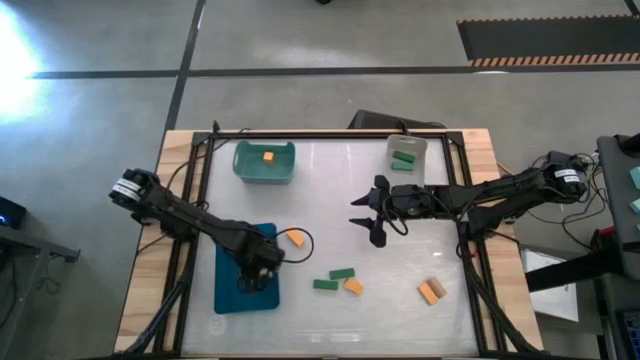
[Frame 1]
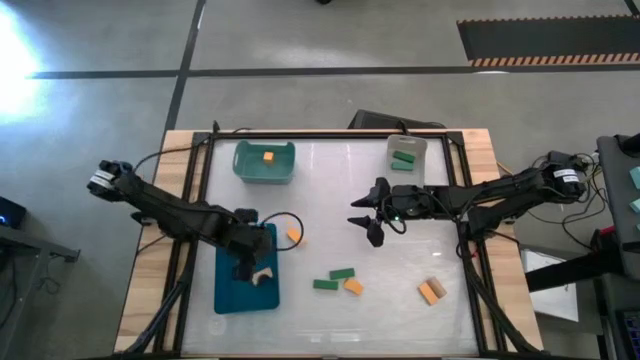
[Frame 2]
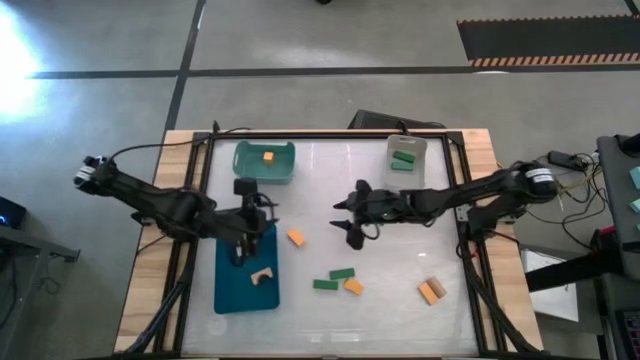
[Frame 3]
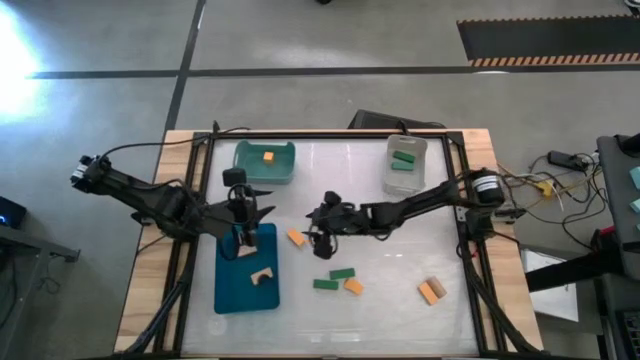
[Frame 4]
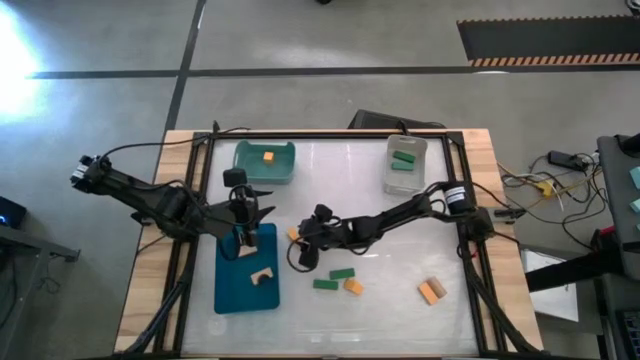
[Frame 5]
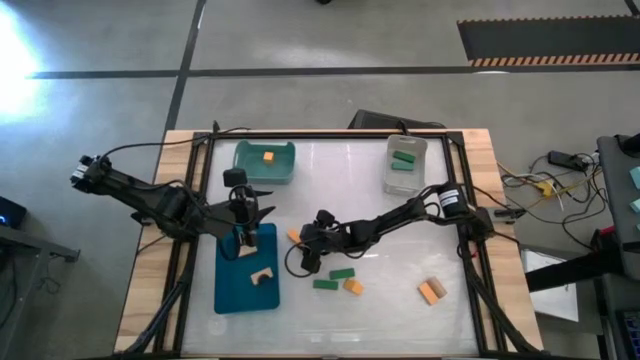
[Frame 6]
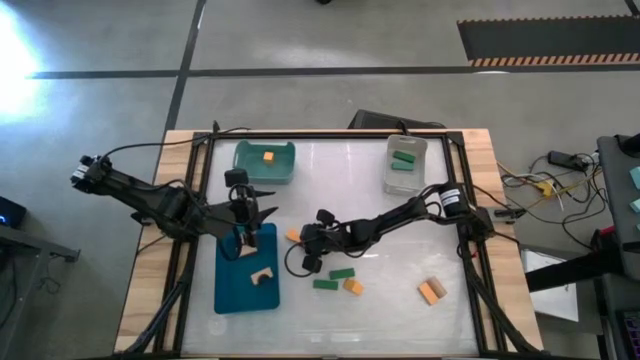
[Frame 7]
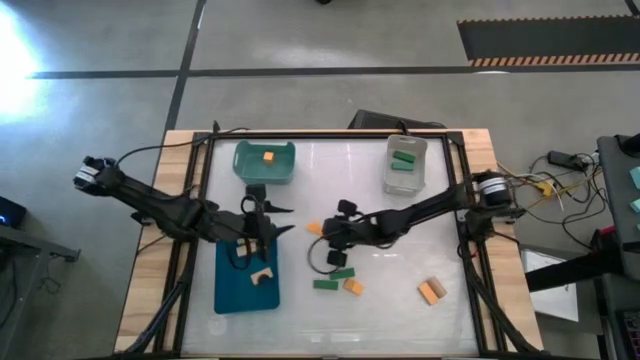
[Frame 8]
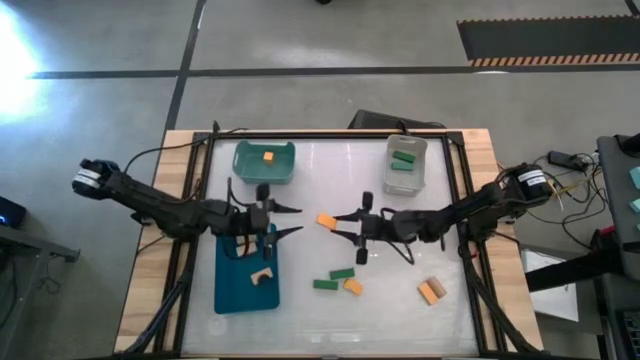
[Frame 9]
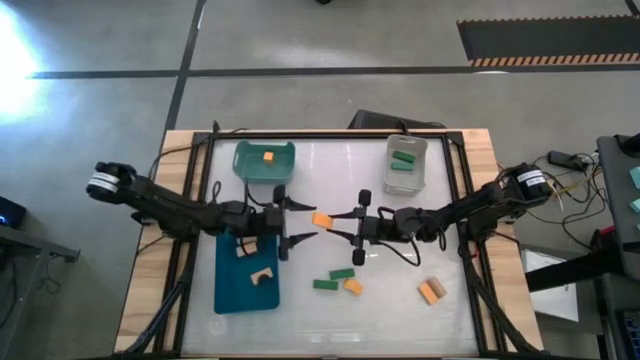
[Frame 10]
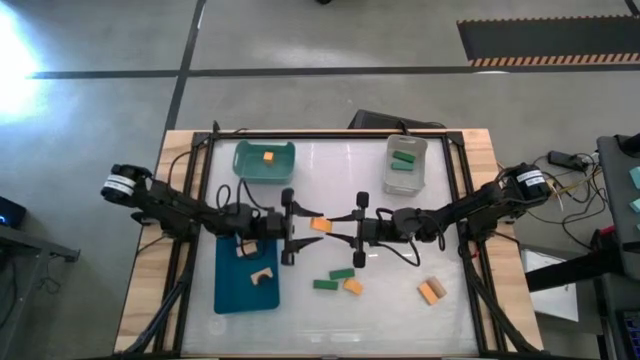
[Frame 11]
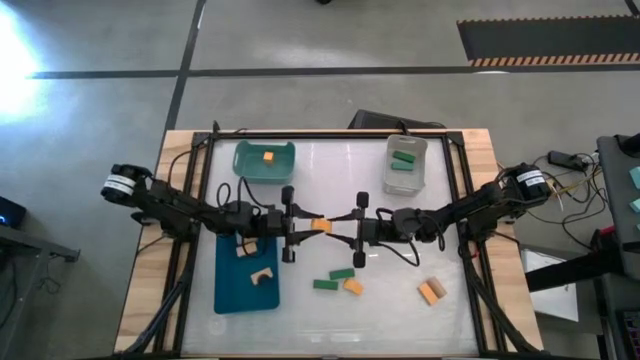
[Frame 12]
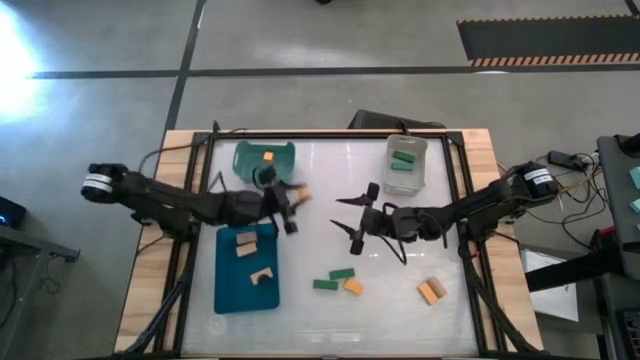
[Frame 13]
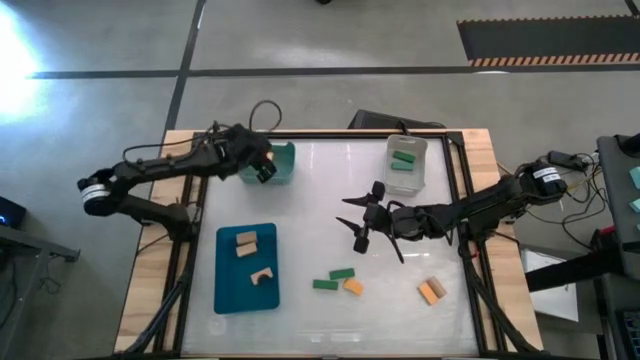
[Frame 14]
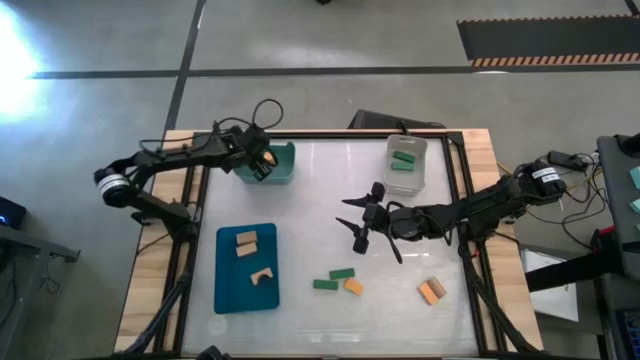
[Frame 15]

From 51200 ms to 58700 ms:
Task: Sort & place blocks by color
Put the yellow block into the green bin

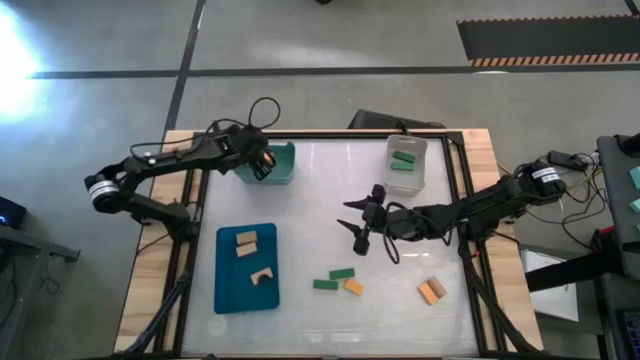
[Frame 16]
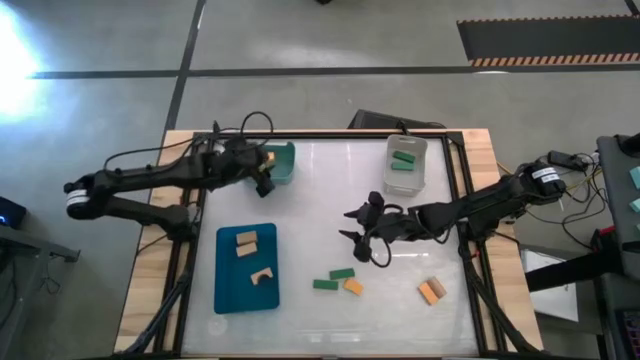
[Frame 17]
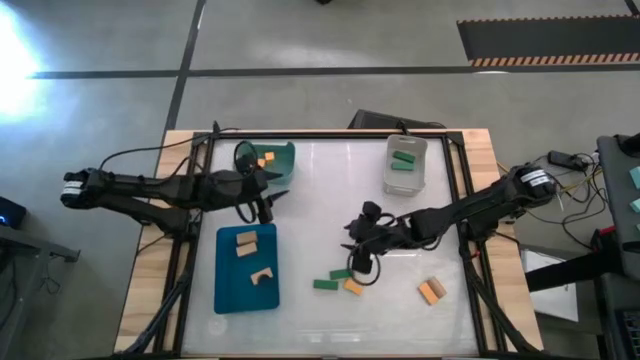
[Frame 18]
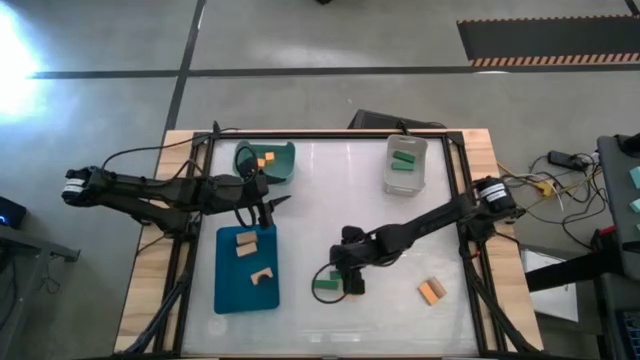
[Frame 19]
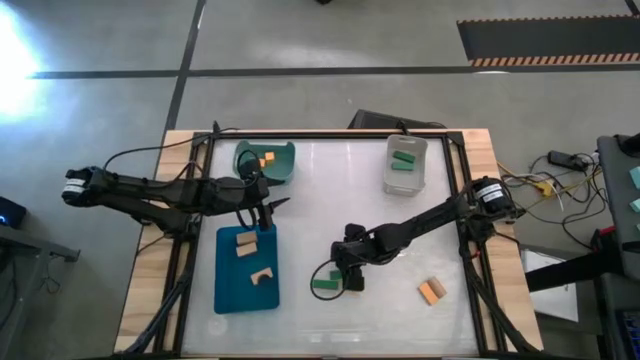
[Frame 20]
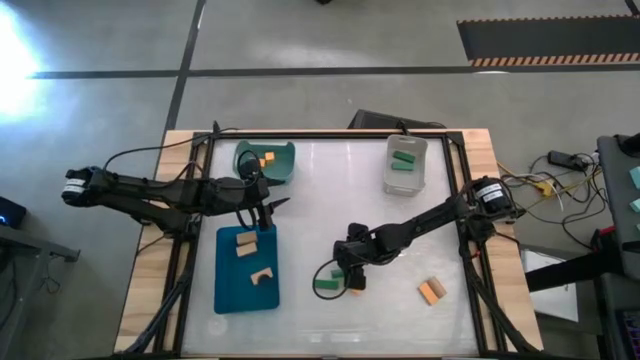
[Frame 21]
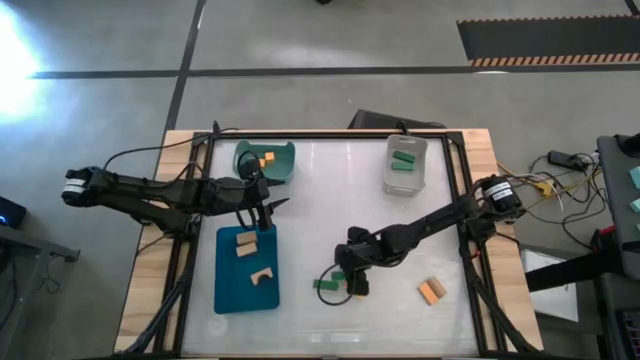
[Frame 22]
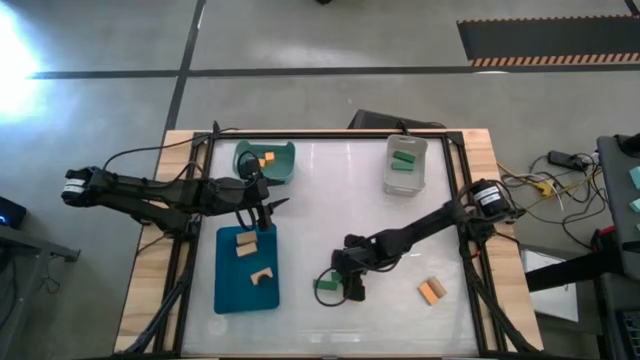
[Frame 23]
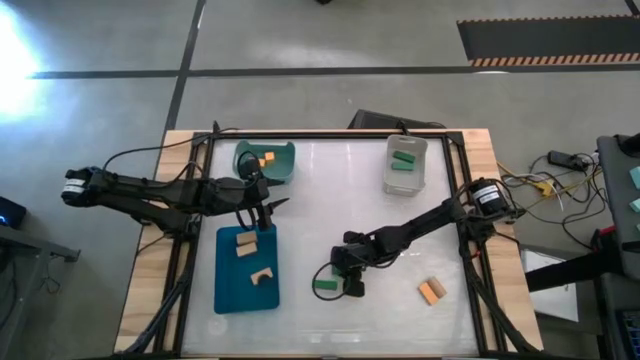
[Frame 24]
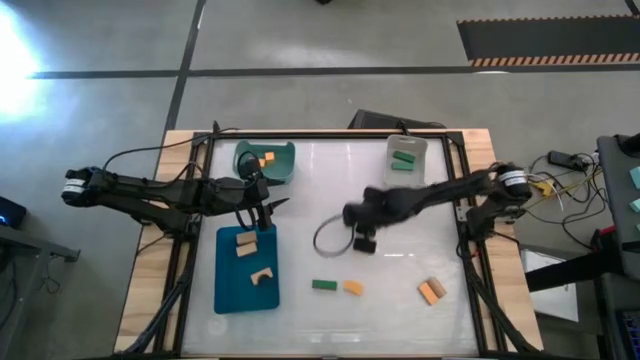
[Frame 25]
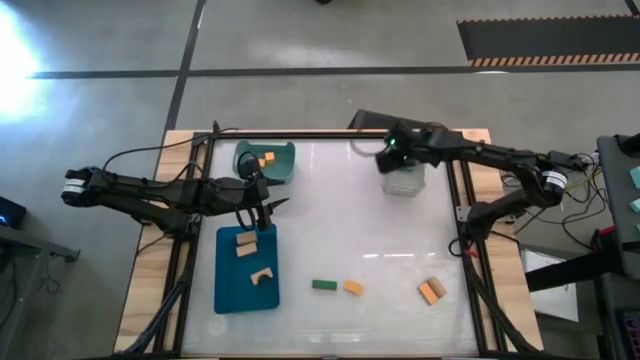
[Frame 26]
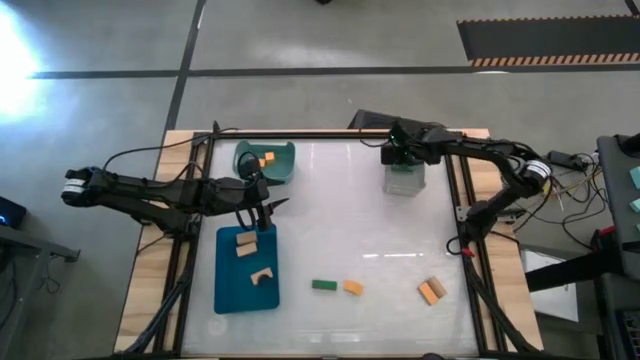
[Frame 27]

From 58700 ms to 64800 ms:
Put the green block into the gray bin

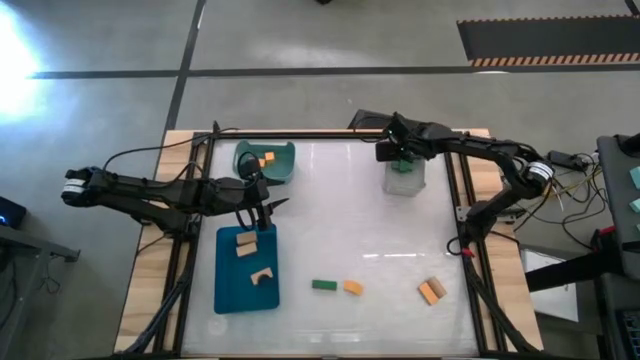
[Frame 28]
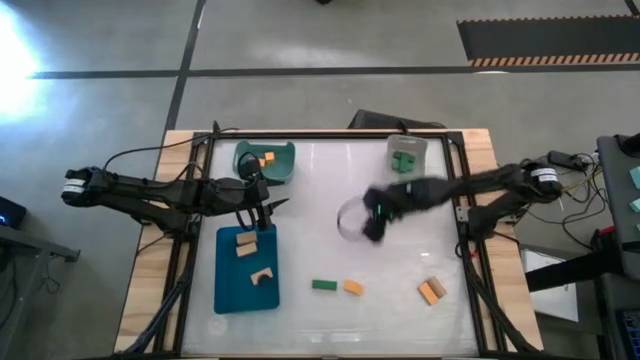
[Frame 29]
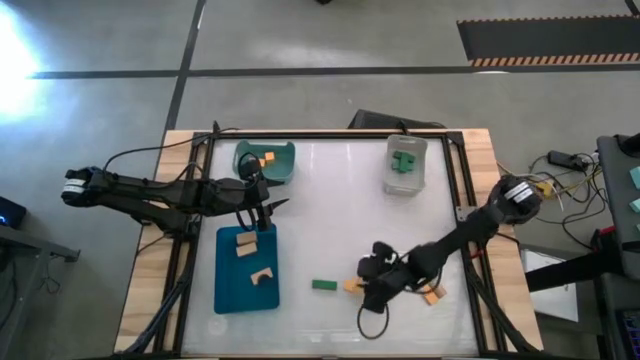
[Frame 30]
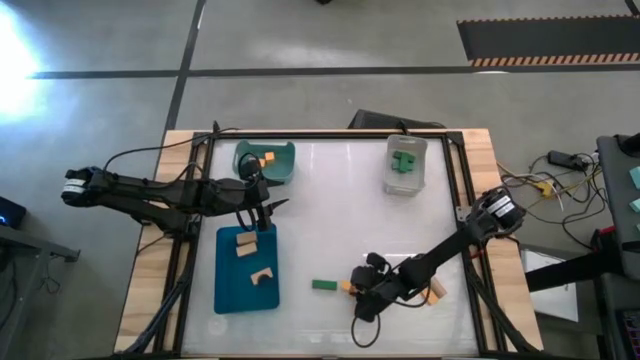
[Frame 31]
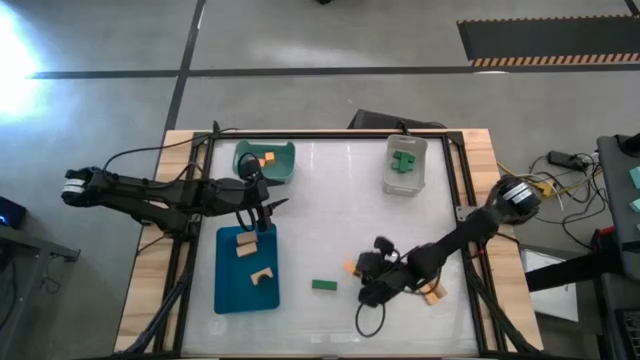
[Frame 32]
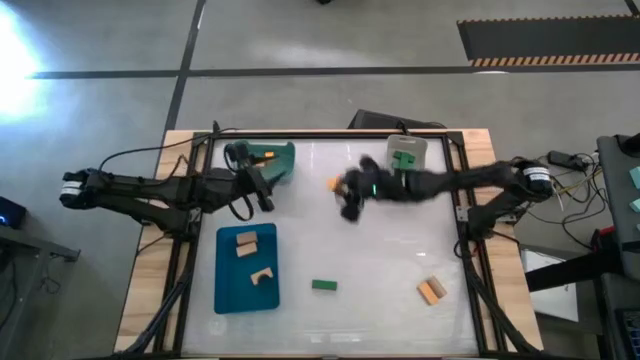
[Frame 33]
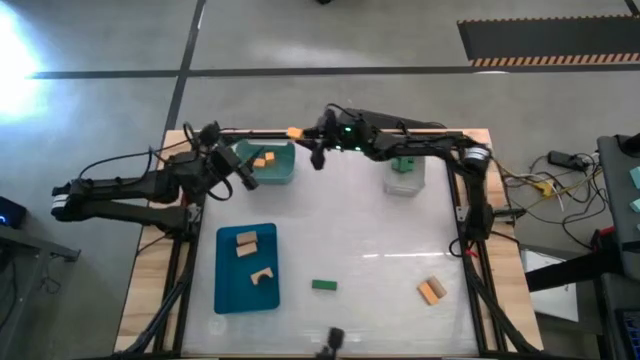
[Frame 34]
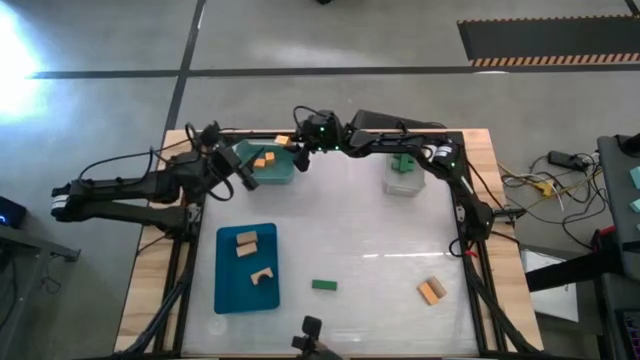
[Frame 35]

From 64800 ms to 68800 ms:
Put the yellow block into the green bin

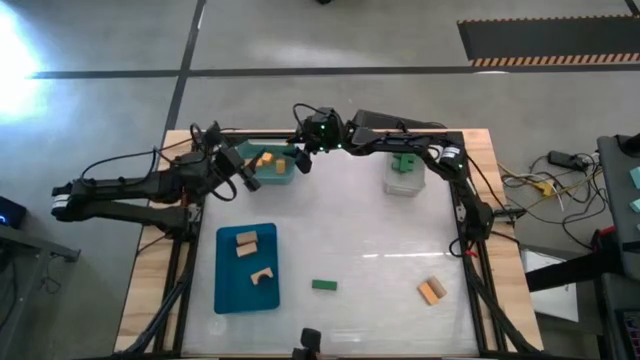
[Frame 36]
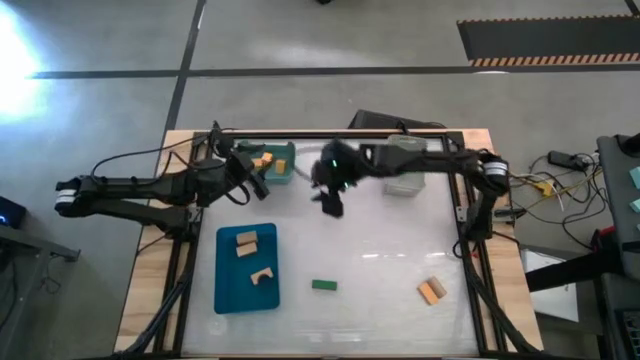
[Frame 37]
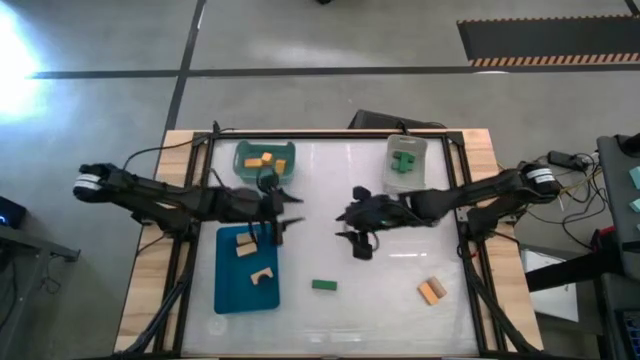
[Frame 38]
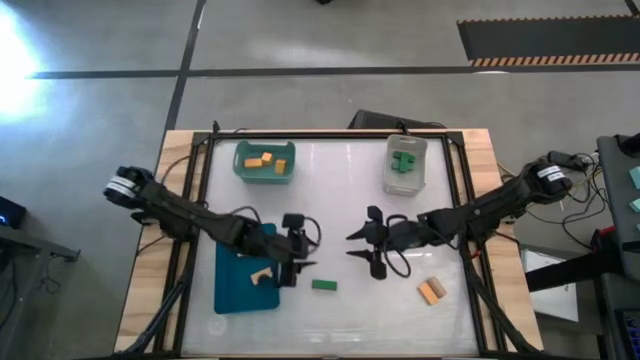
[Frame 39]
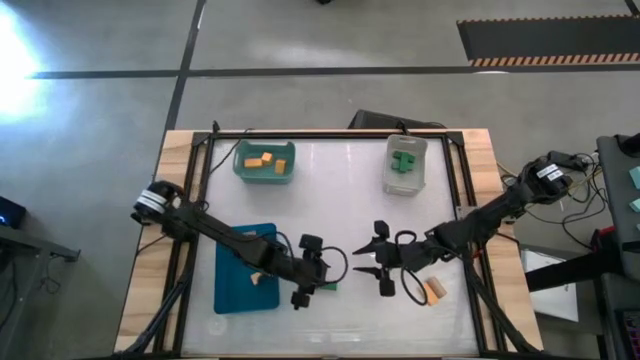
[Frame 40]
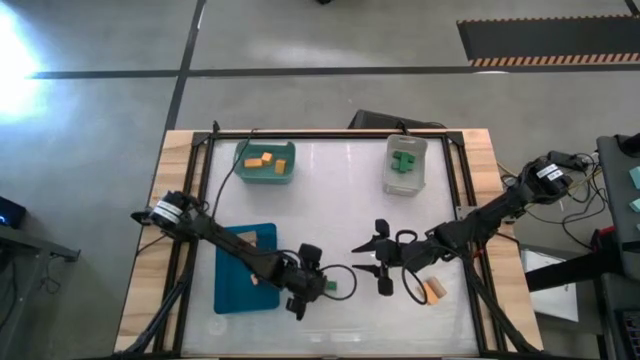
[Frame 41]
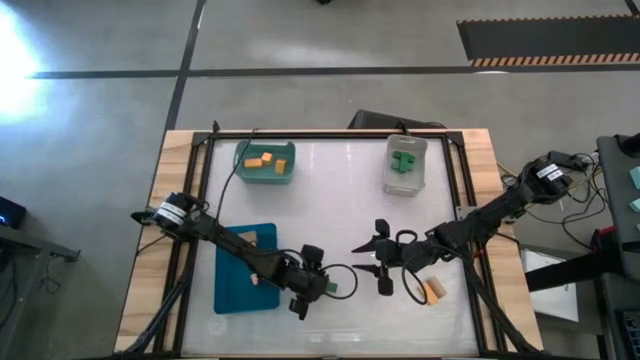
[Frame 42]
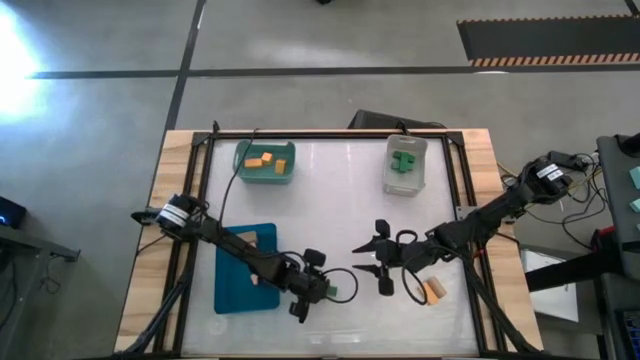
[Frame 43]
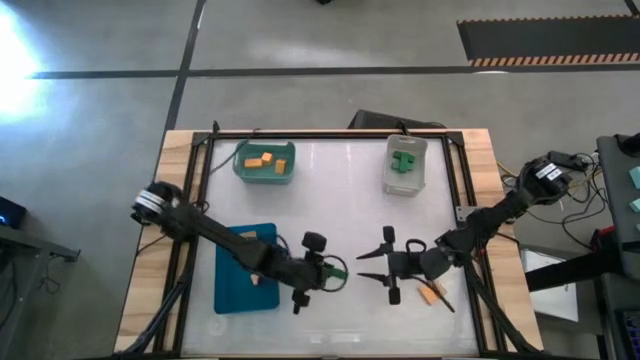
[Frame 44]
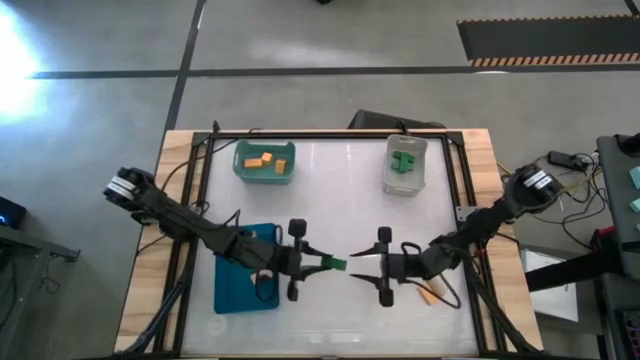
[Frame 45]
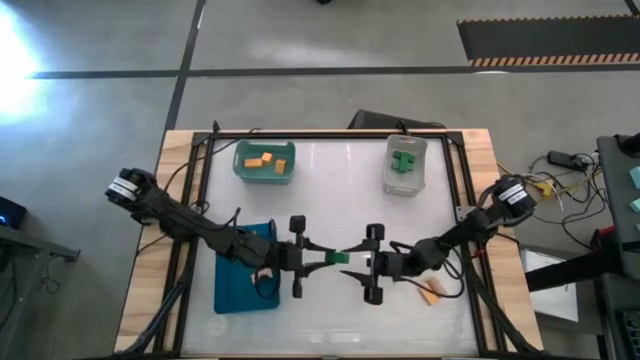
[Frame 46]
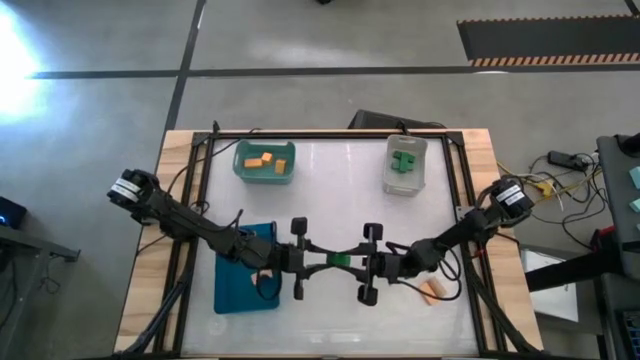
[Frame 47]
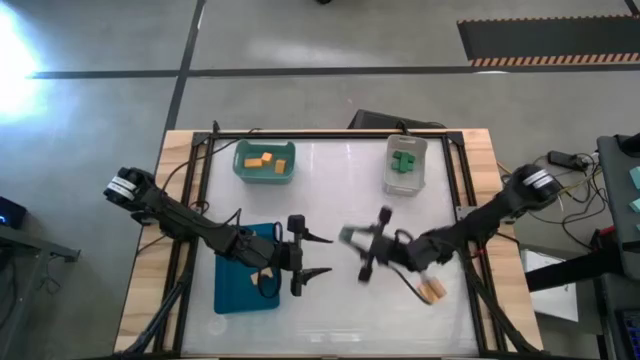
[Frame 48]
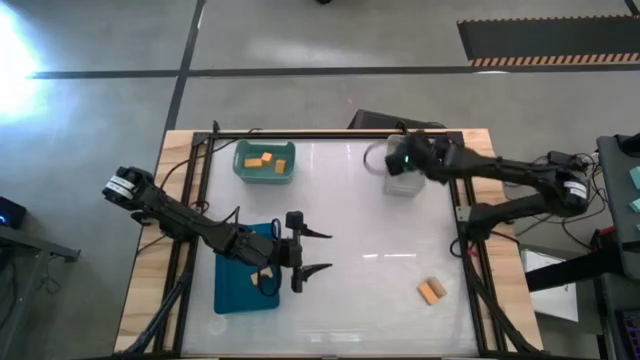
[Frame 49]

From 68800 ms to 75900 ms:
Put the green block into the gray bin
